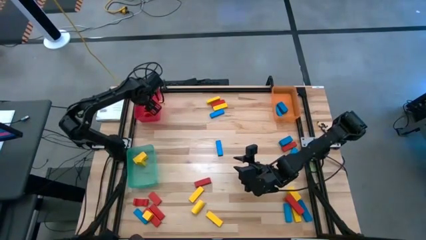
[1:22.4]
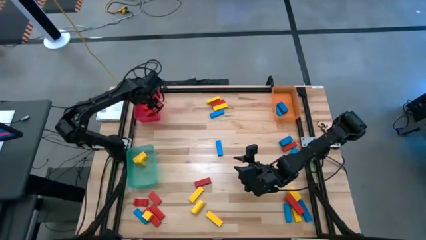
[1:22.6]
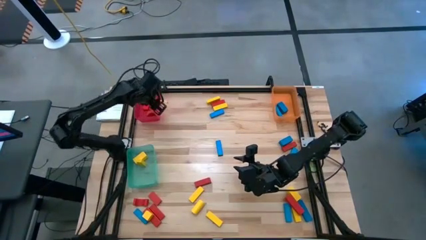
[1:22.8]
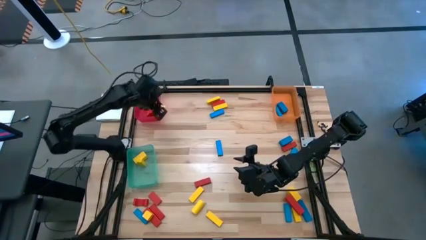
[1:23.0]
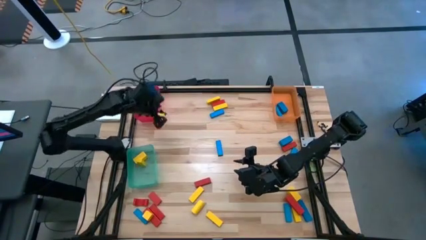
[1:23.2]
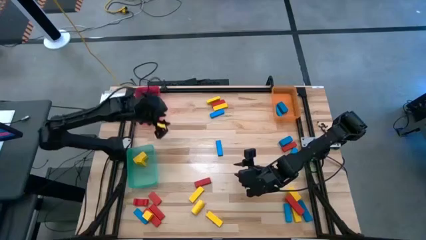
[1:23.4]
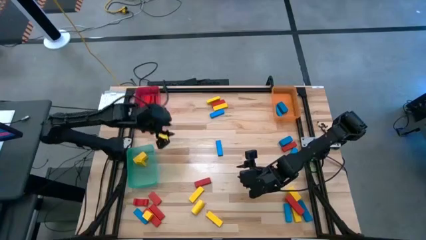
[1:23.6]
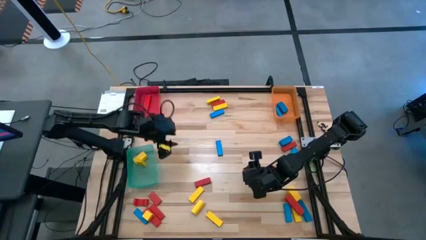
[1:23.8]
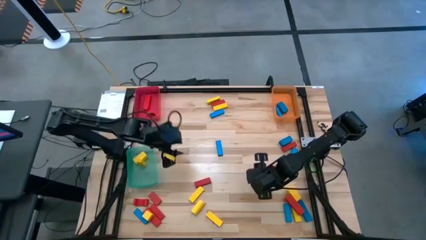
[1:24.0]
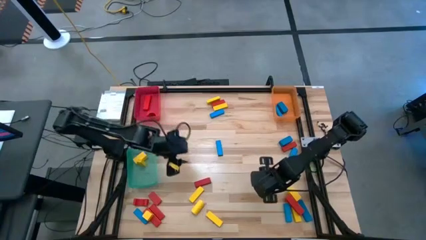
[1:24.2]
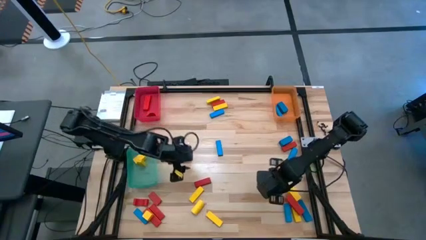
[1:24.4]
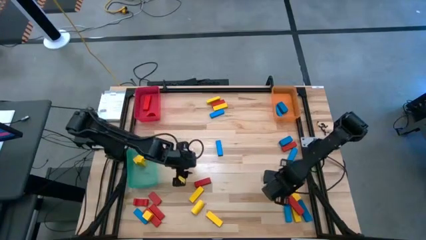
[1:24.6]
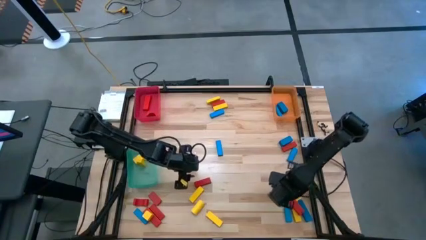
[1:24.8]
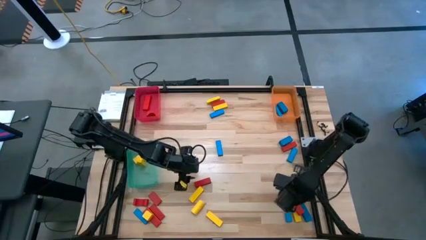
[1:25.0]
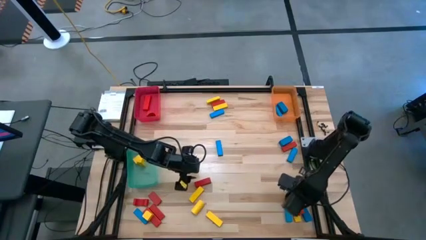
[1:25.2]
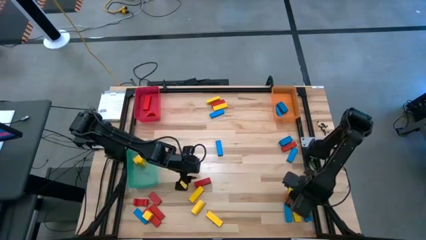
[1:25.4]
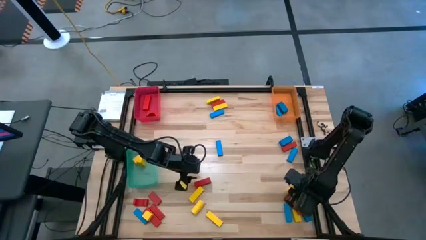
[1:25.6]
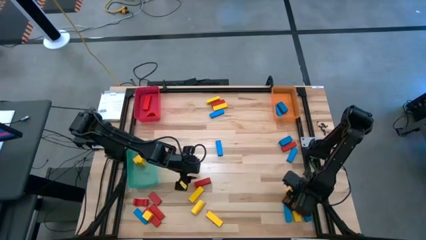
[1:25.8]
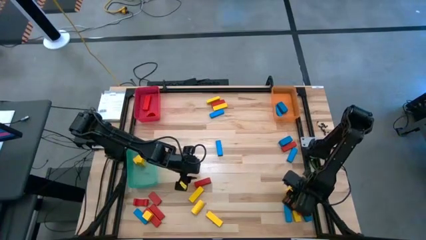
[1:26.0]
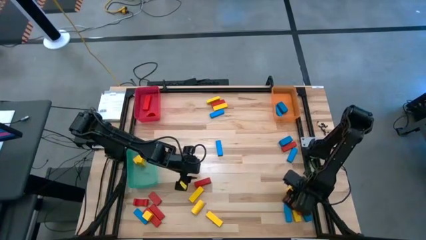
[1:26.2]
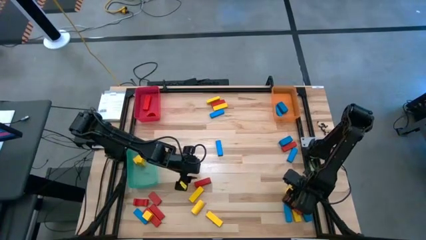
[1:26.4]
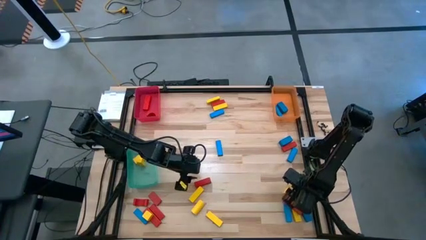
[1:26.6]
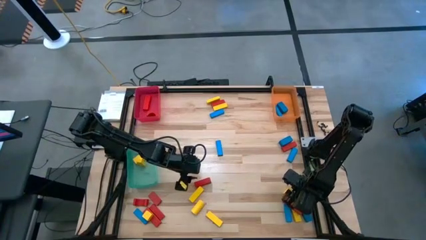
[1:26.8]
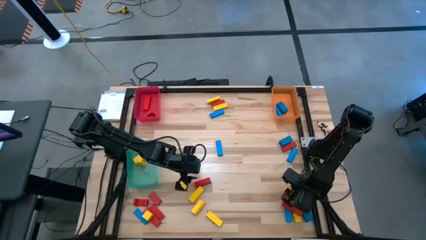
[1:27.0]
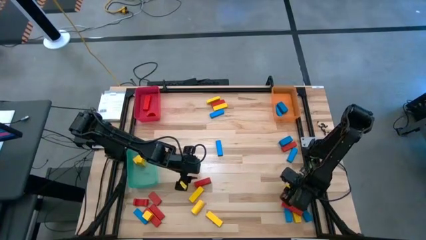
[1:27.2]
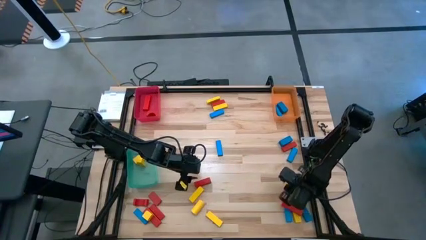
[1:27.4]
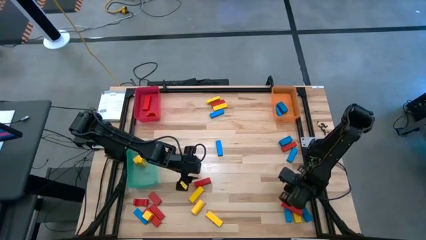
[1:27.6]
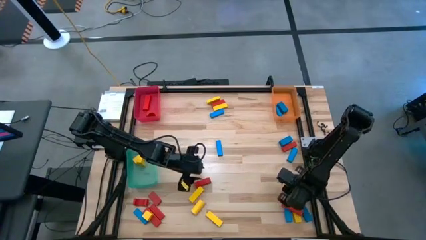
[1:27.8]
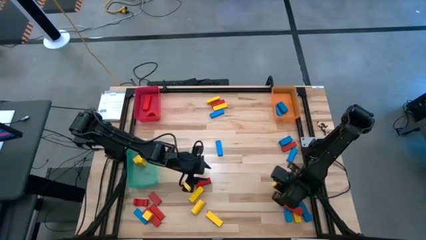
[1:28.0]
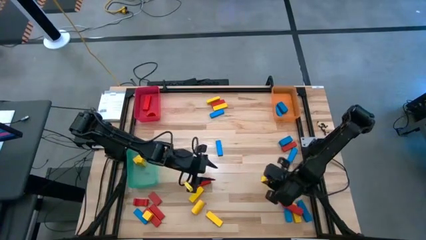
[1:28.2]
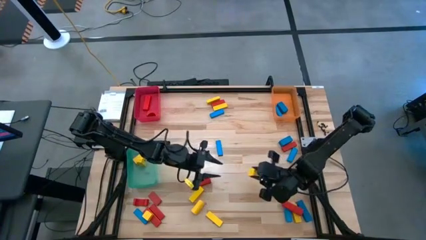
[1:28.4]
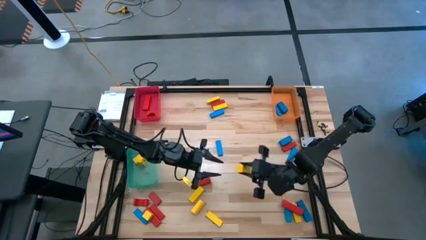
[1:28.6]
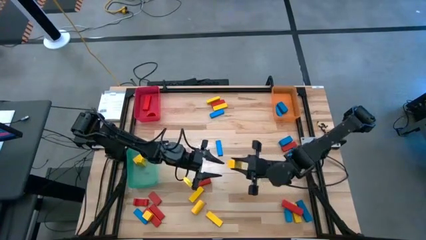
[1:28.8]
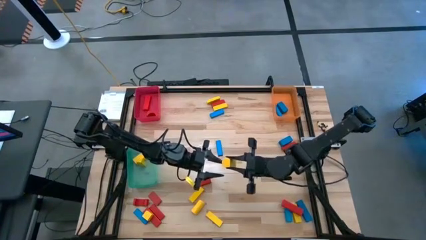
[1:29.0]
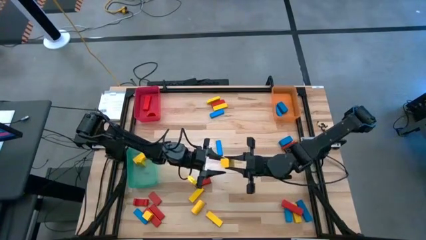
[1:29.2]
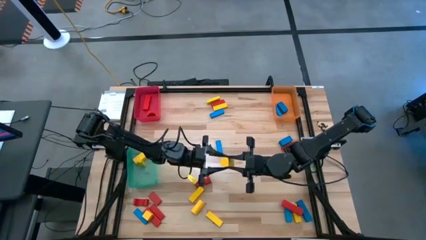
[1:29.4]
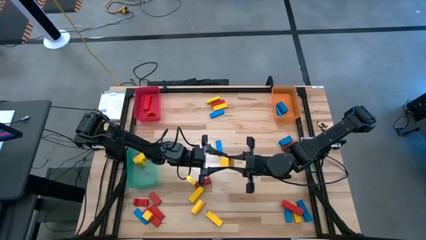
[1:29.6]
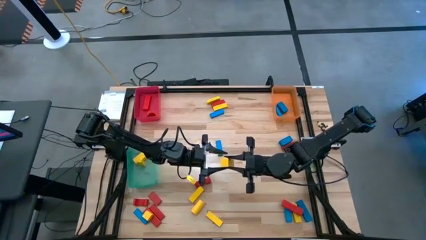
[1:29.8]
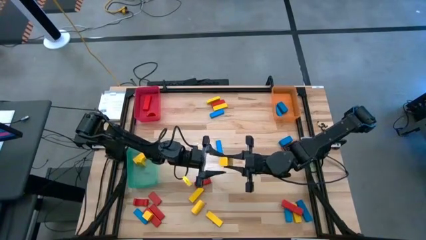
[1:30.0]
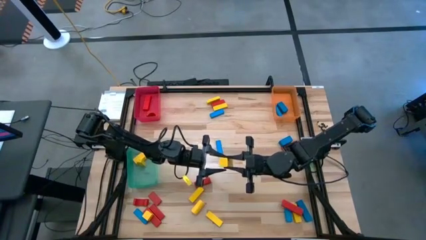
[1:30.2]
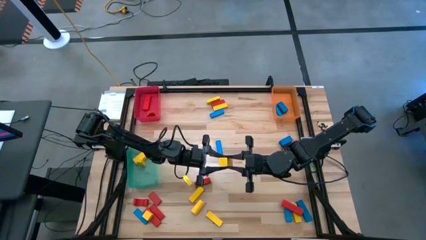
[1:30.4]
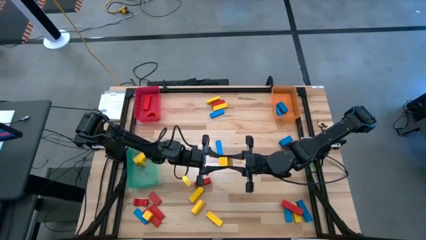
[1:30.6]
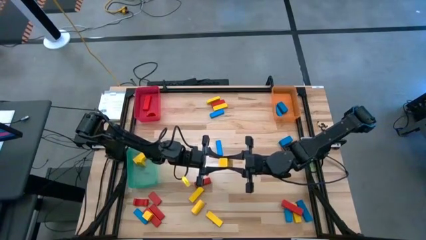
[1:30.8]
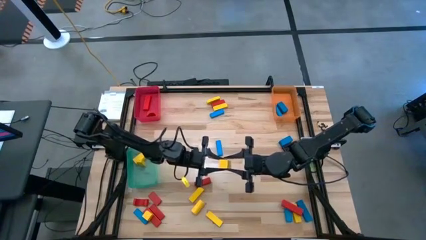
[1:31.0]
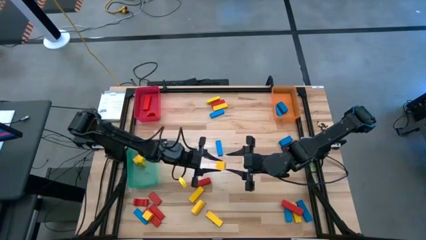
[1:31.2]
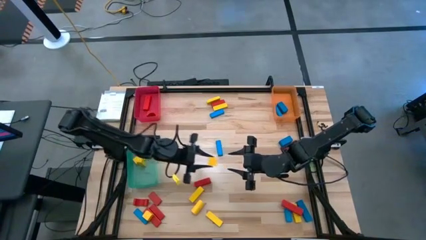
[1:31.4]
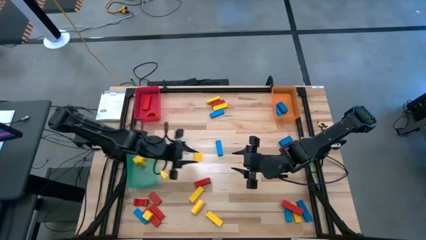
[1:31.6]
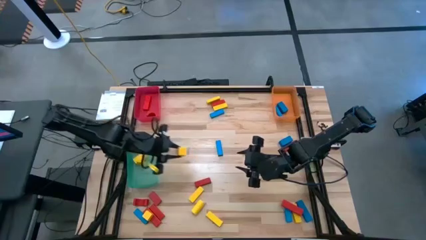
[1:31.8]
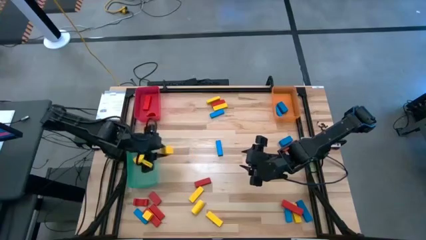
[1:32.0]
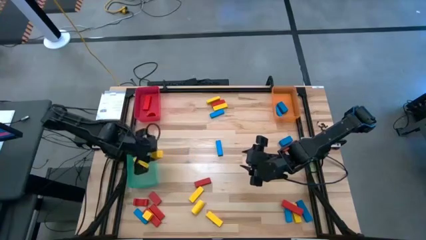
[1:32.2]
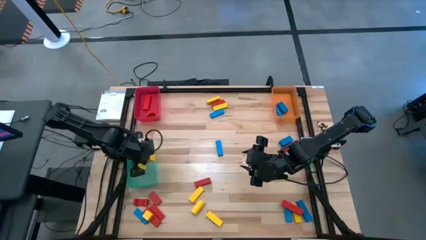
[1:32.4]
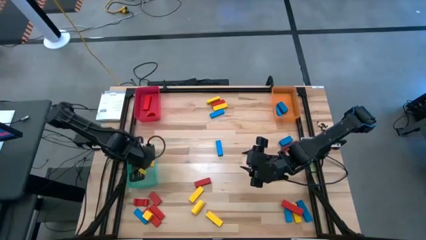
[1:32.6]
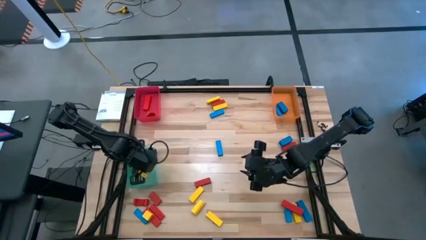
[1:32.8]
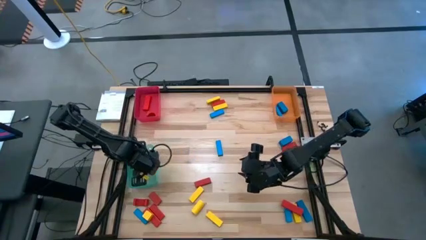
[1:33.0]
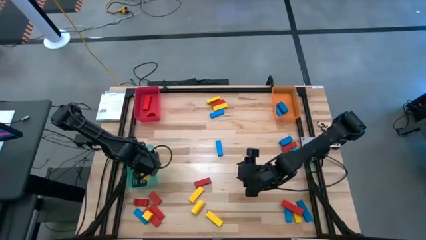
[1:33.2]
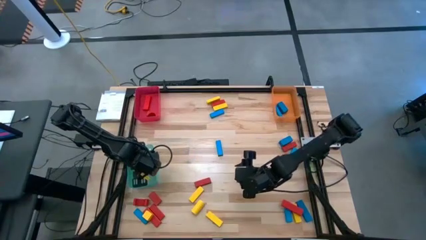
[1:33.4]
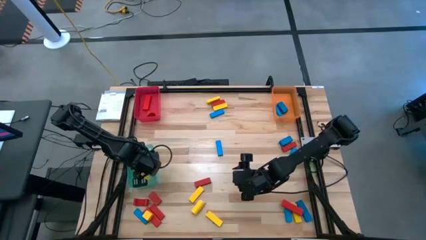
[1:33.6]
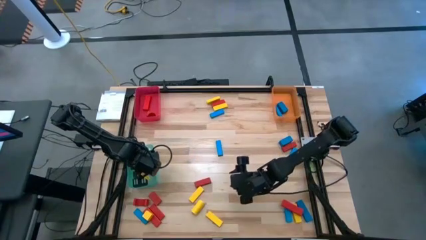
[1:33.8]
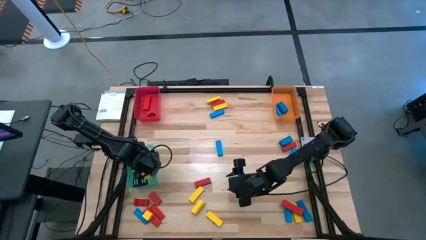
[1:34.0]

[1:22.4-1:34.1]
Task: Sort blocks
Put the yellow block into the green bin
